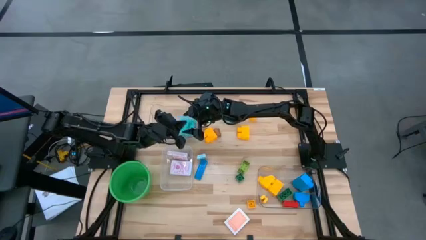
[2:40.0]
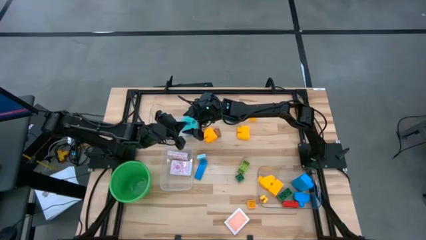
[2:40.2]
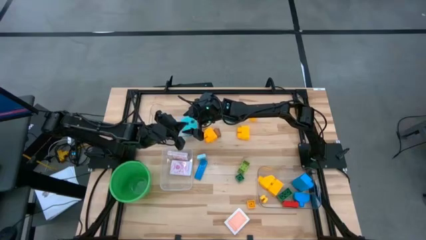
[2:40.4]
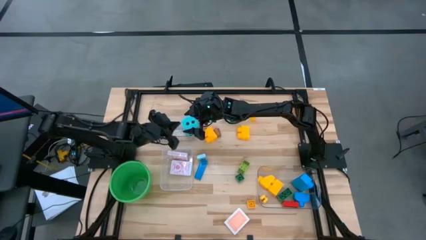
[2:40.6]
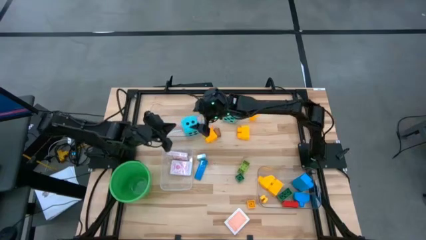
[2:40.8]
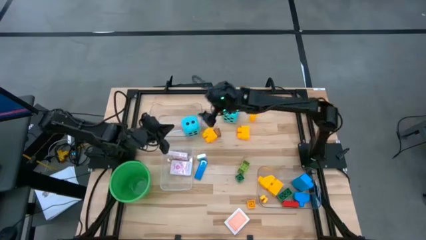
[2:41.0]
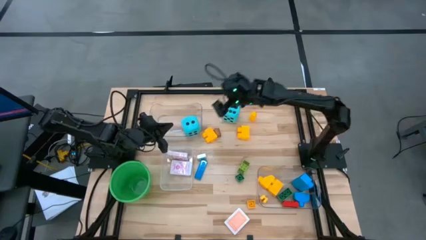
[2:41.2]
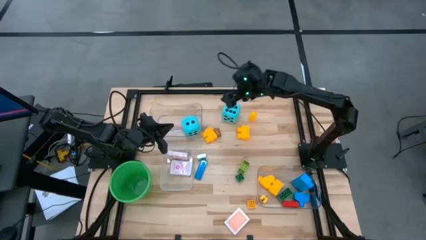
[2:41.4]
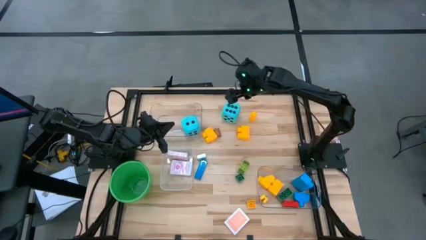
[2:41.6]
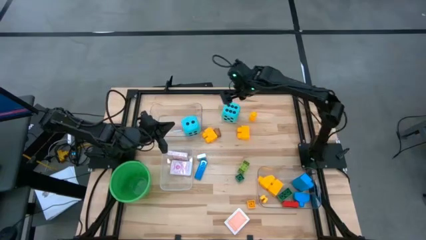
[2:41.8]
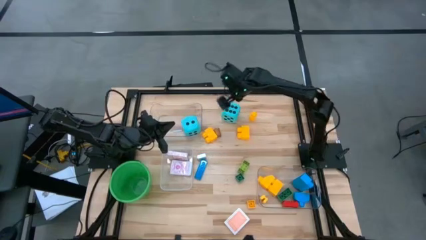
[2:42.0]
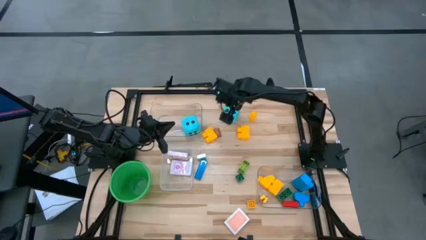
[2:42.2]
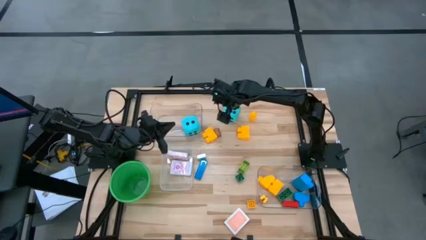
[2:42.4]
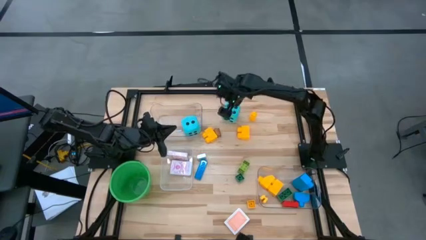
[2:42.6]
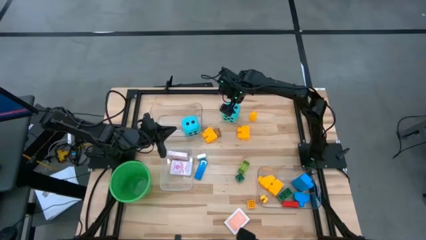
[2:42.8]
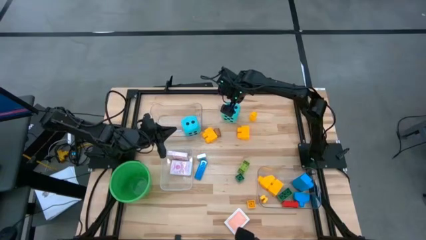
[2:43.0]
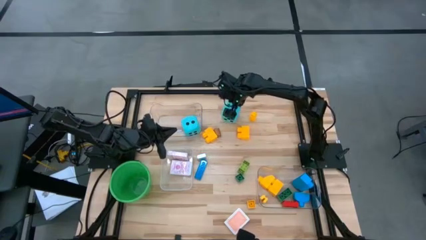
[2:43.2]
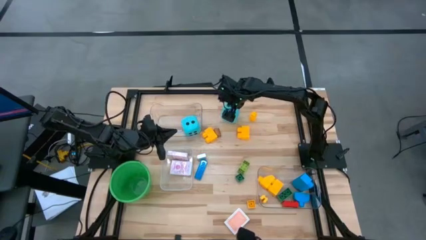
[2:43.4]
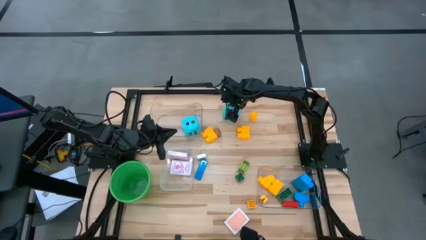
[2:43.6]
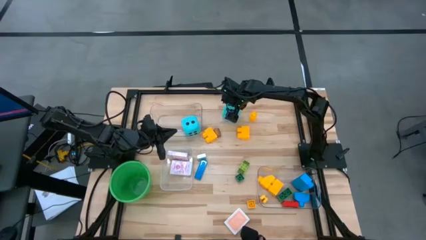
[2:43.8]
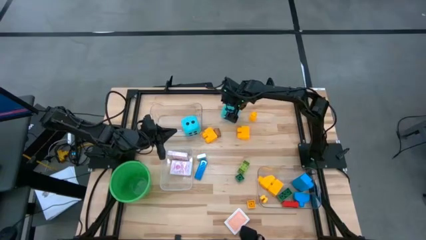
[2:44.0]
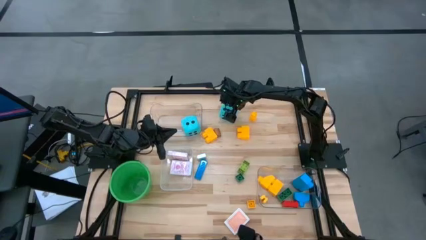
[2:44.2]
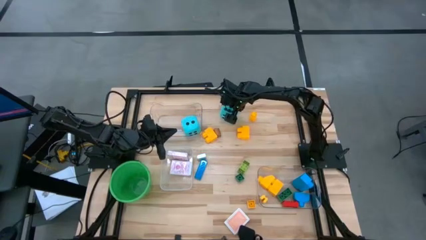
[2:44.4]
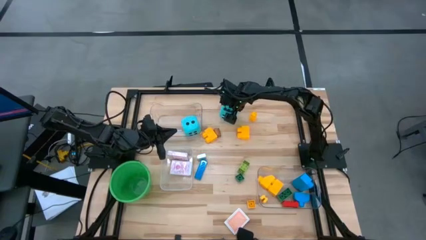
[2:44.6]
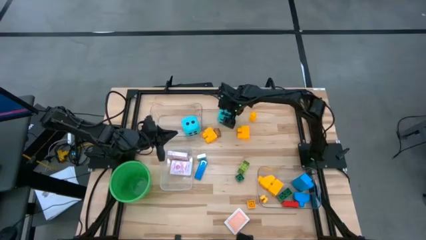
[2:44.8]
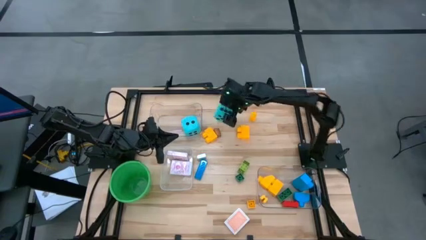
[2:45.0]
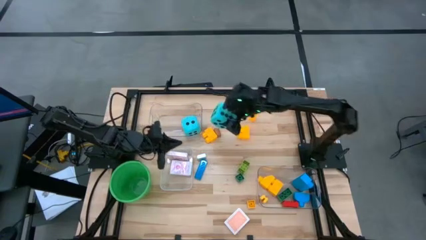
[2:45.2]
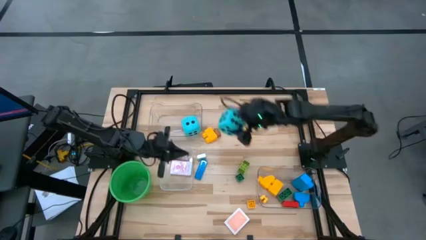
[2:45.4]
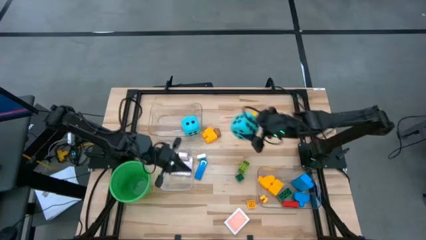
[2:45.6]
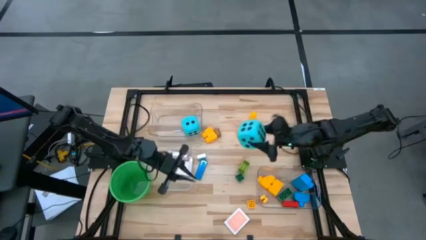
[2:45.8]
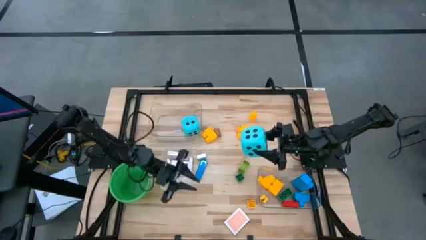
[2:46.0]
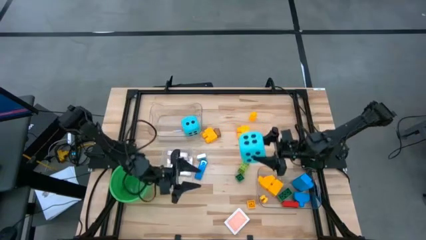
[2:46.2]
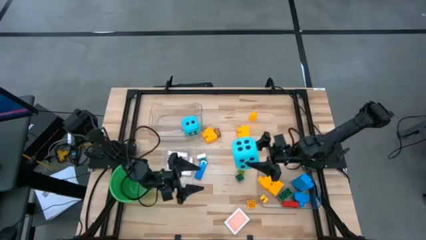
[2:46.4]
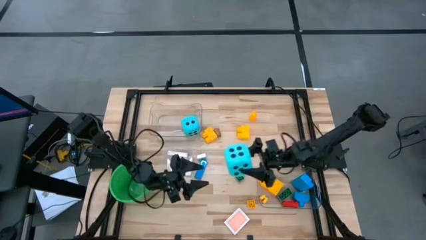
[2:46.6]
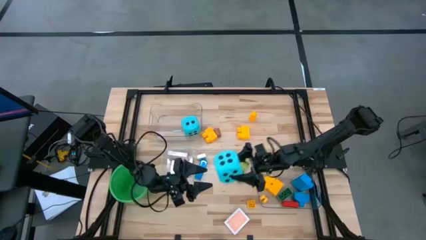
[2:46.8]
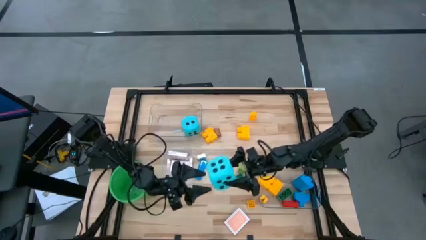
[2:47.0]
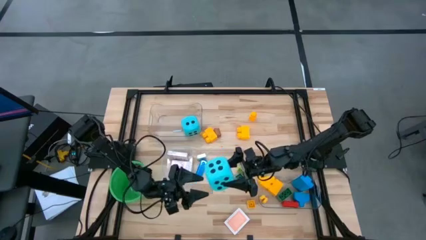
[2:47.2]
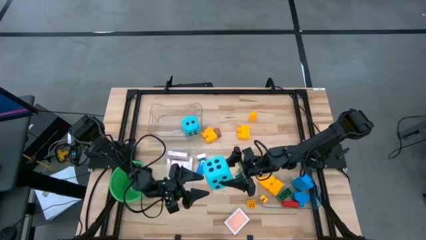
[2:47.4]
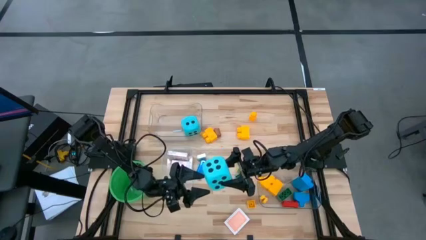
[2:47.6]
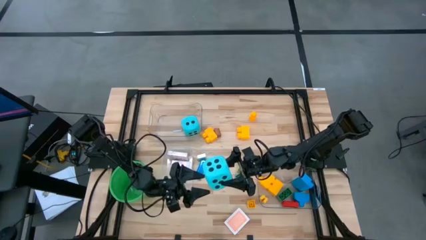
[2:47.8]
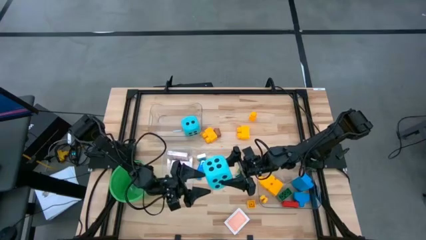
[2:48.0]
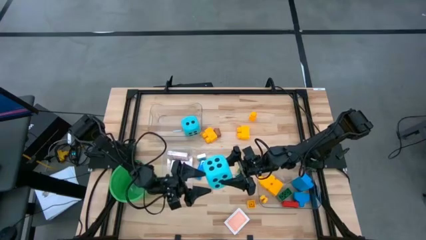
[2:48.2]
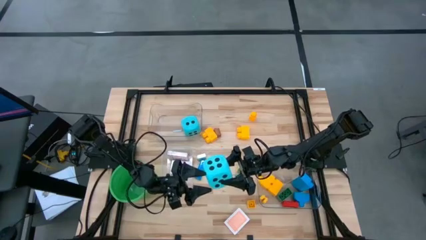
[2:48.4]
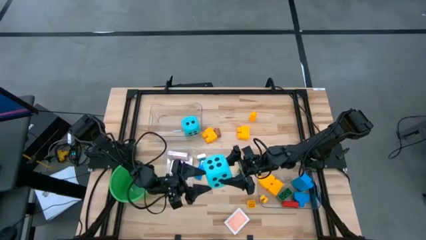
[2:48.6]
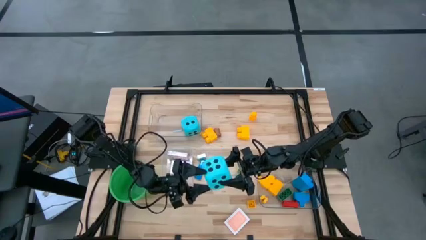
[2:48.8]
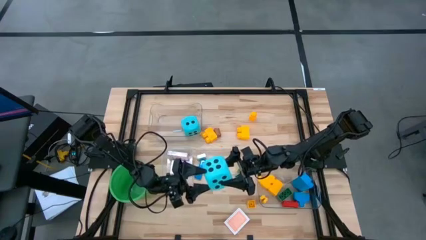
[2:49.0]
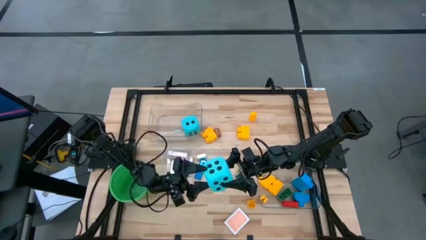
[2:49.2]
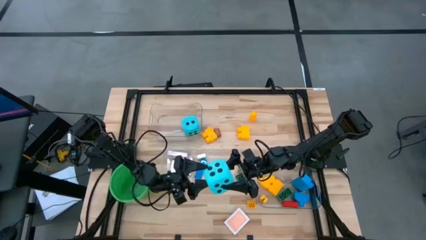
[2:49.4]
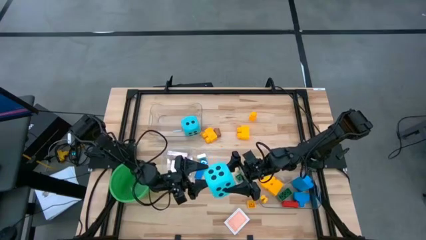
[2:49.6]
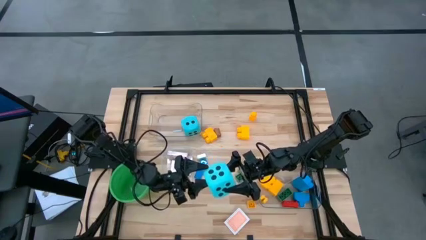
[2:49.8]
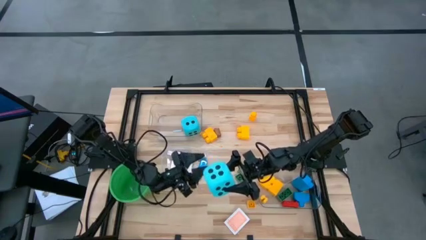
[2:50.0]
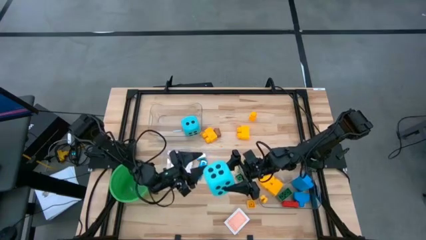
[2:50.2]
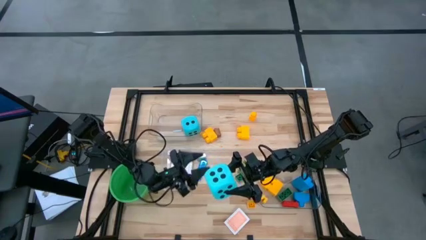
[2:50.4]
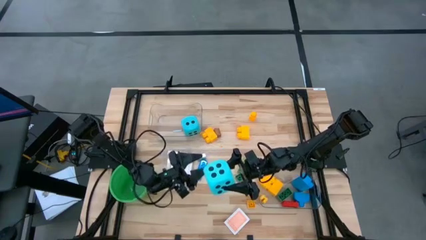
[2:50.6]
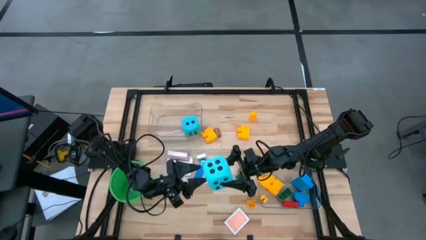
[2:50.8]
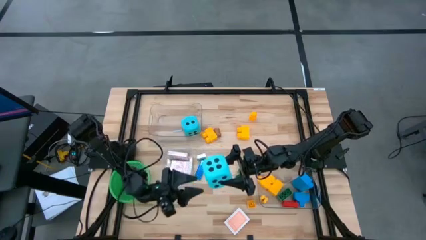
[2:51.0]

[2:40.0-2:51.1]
Task: Pick & Place Toys
Put the light blue dice into the top transparent bin

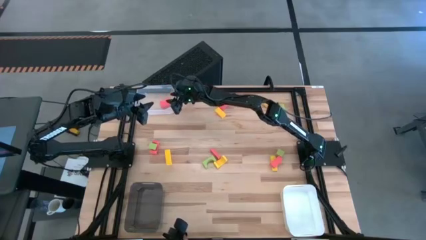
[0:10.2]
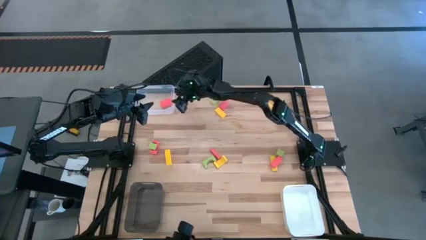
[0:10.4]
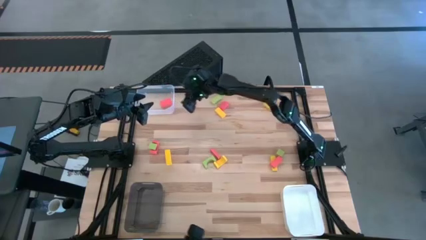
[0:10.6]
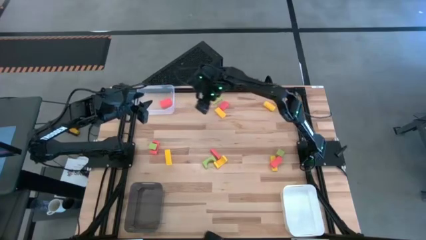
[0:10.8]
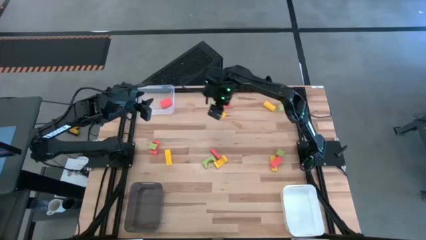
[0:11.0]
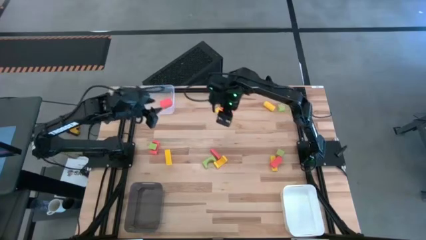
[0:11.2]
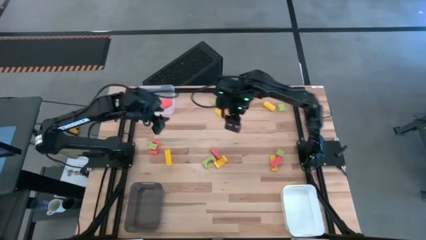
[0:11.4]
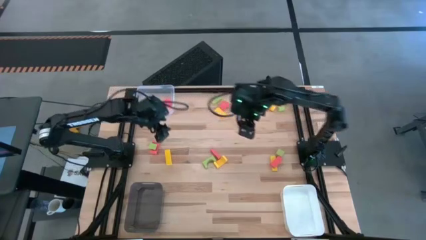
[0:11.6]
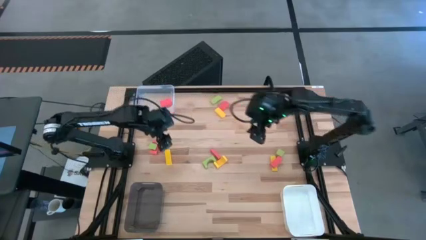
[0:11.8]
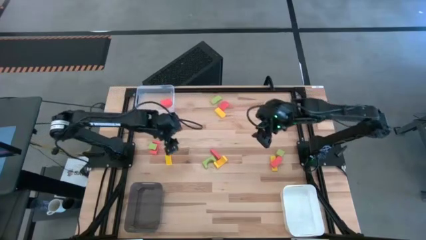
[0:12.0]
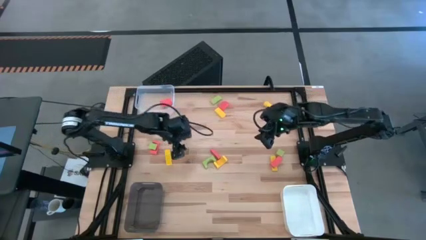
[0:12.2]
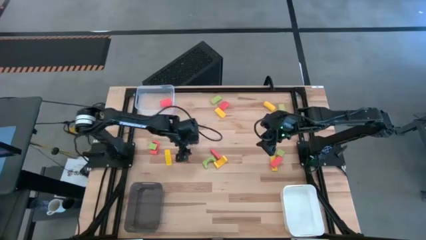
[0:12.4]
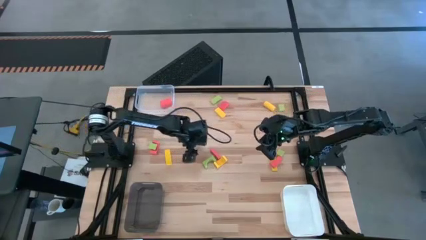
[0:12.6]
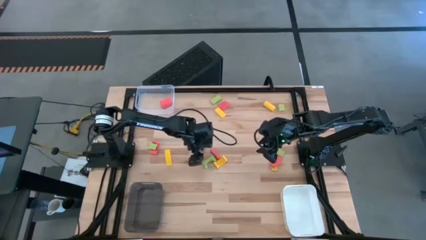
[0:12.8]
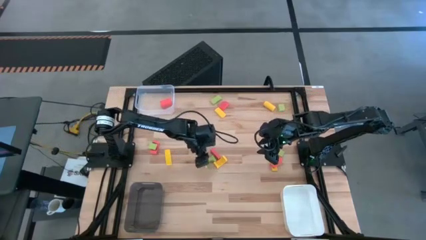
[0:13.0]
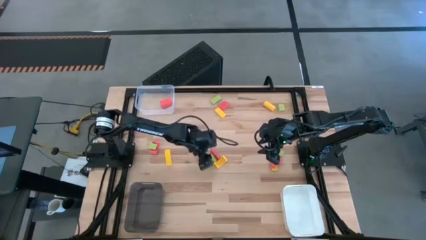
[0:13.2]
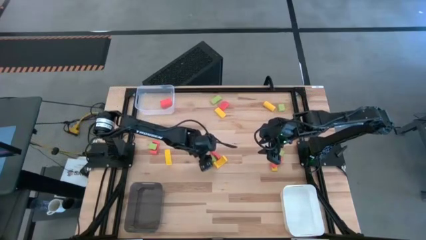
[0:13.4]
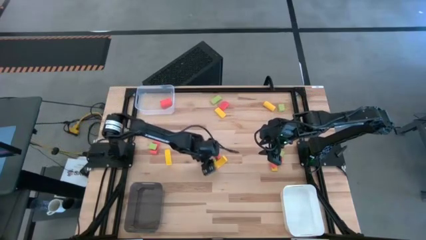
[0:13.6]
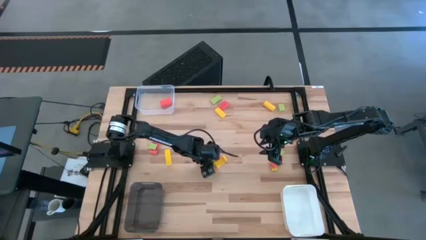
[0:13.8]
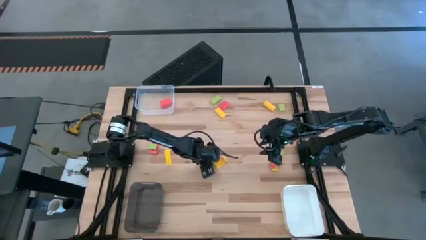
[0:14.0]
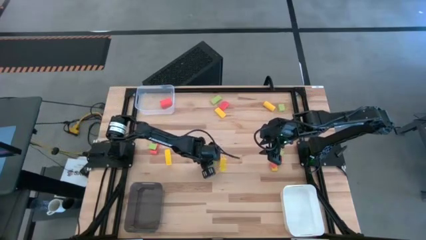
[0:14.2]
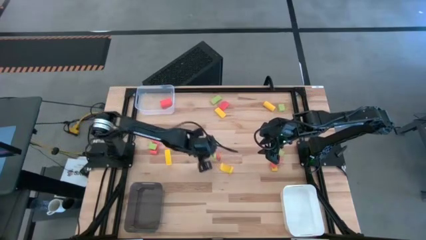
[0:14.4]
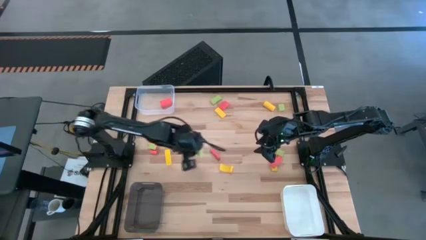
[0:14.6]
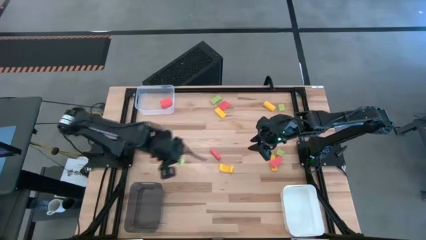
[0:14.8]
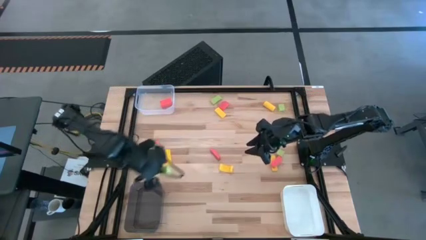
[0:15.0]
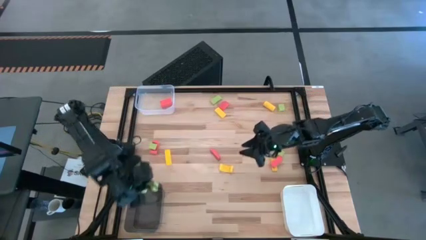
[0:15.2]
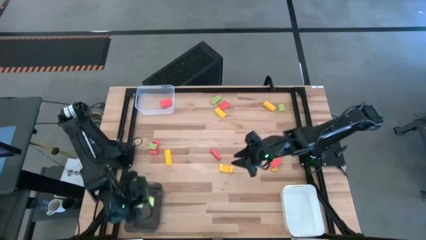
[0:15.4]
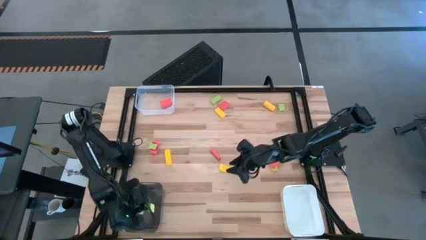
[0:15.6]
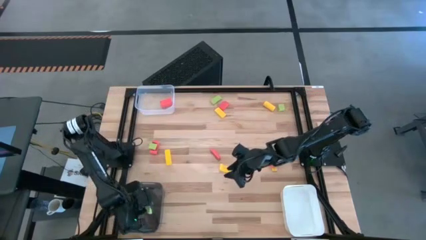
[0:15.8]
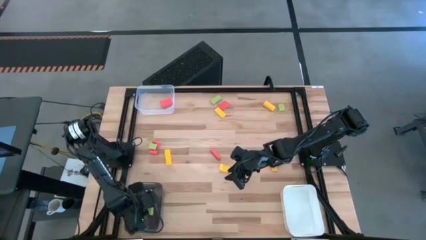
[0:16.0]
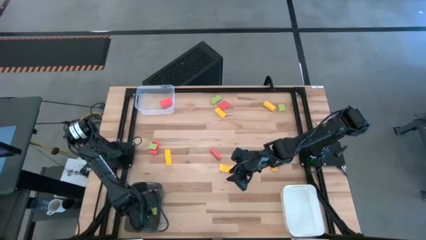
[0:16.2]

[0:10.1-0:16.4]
Task: Sort & place blocks by color
Put the green block into the black transparent bin
